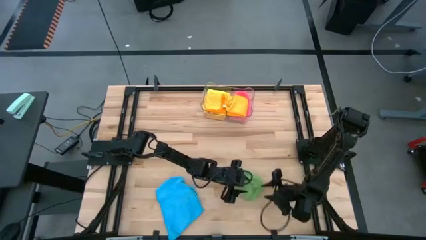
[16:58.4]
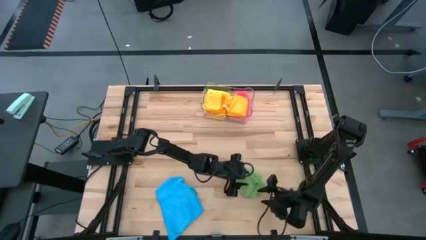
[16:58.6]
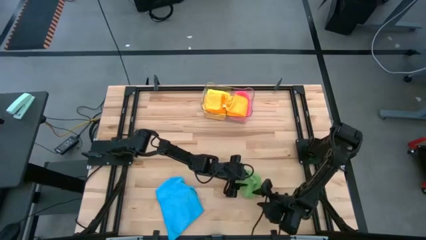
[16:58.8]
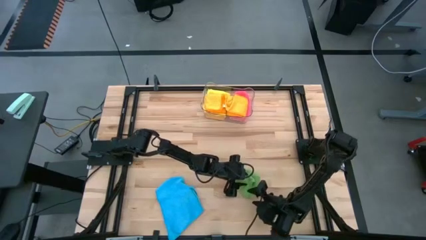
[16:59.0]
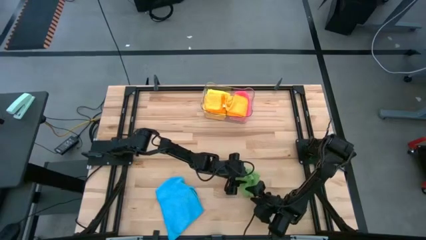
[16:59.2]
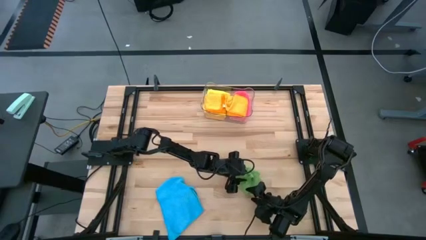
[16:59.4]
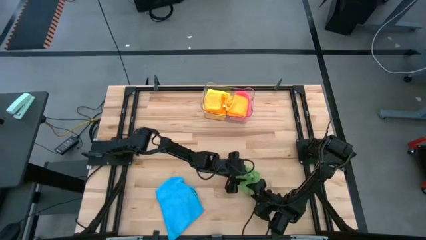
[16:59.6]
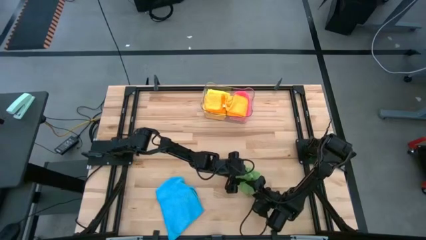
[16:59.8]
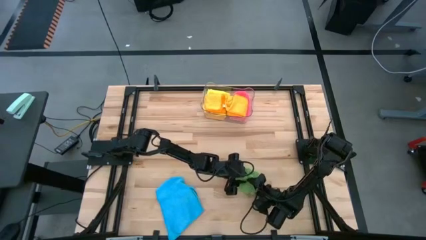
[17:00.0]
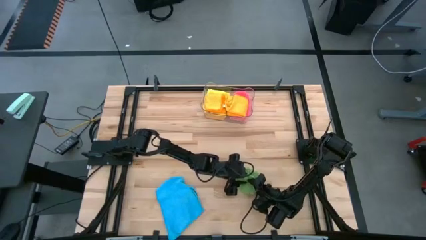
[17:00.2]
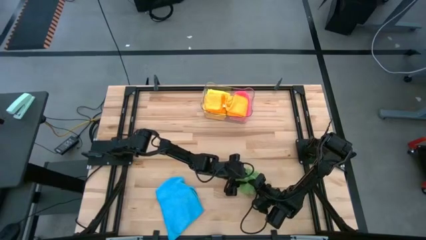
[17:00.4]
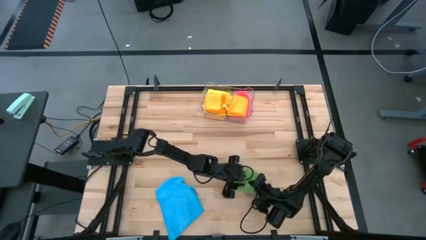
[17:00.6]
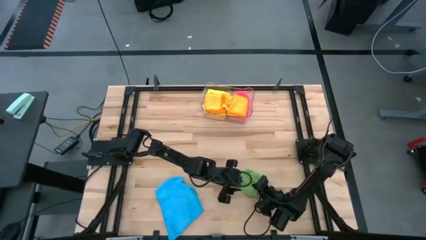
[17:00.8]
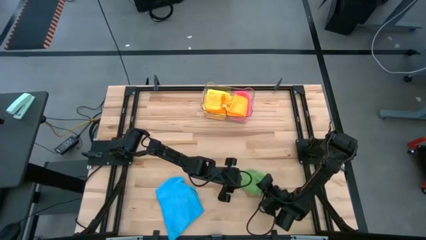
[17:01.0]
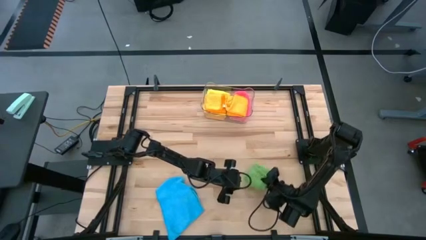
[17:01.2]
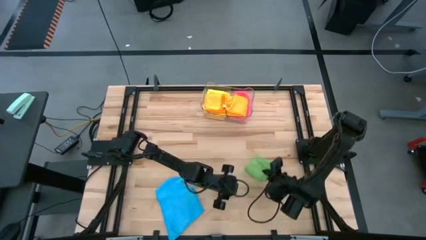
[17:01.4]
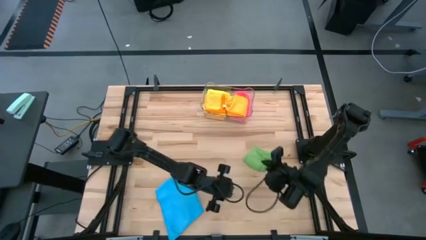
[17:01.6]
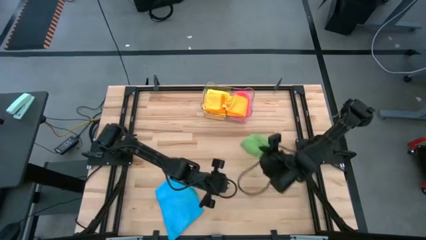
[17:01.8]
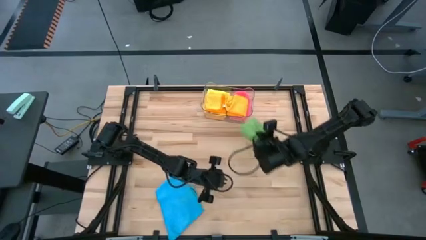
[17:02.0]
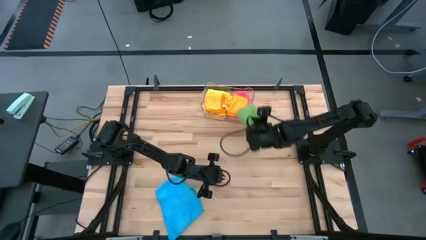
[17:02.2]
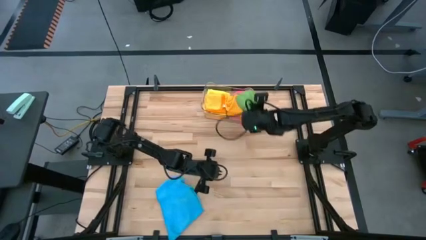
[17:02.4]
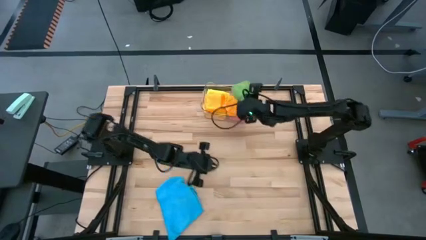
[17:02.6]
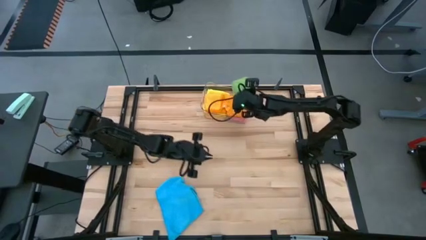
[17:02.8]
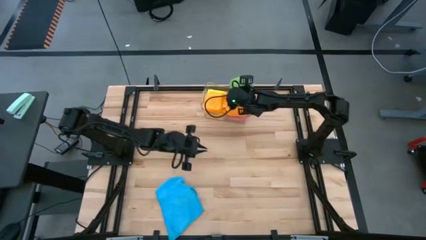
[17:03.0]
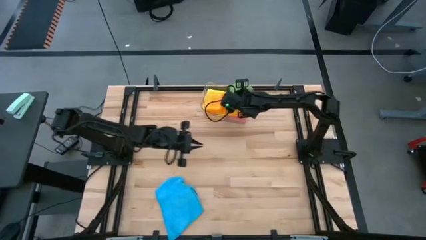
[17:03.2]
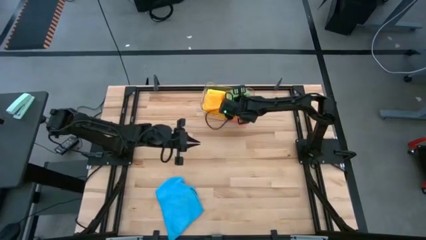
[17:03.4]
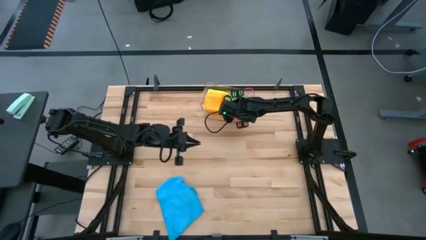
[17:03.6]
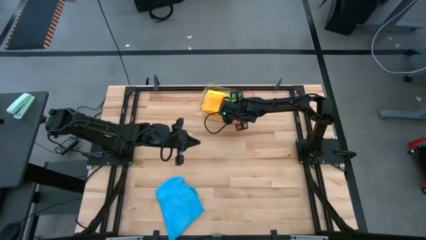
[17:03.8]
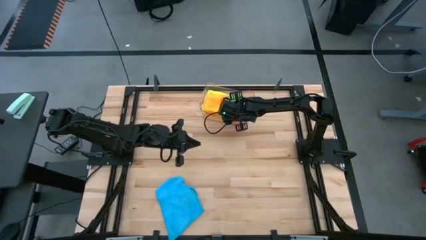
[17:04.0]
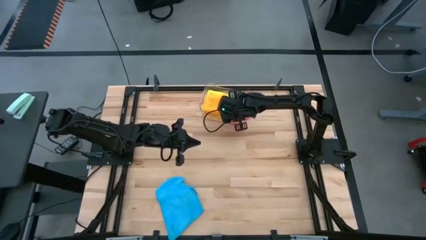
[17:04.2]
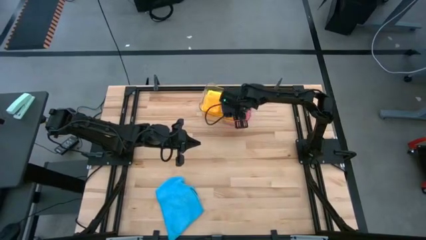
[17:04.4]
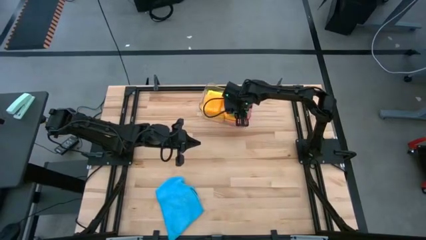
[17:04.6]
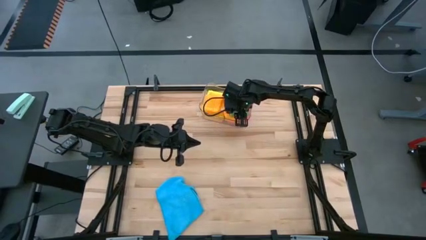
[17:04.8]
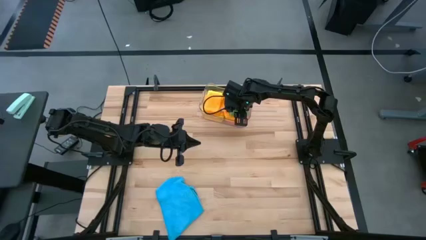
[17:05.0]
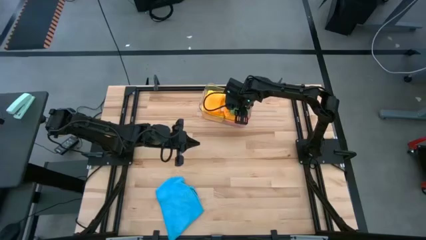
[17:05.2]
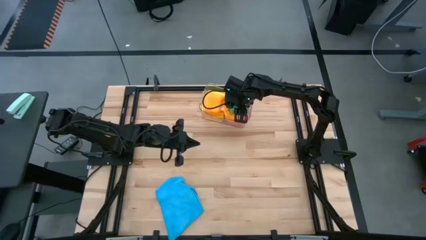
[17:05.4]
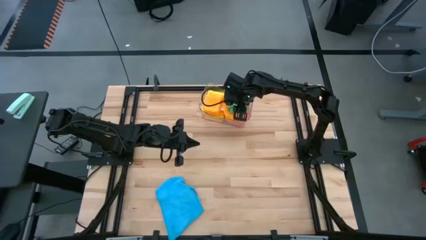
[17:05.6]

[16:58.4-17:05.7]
Task: Fold microfiber towels
Put the green microfiber cloth into the transparent bin

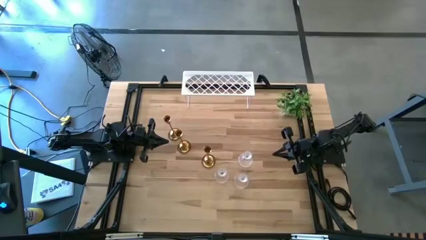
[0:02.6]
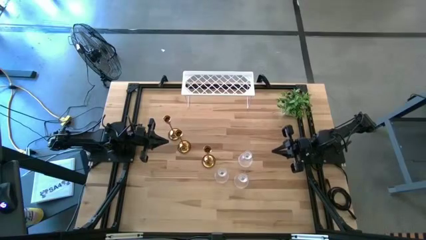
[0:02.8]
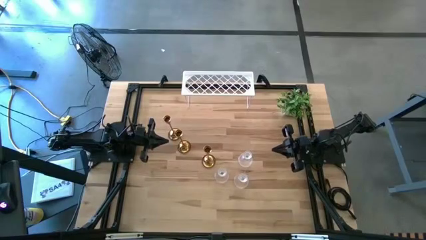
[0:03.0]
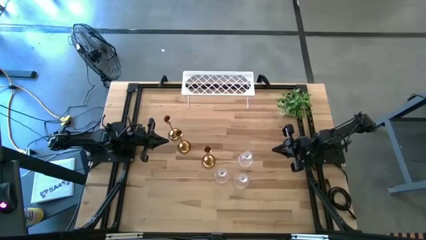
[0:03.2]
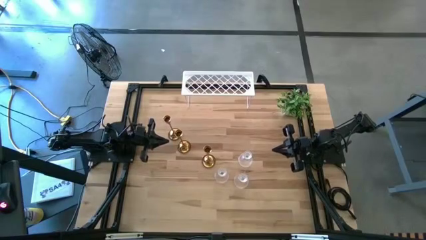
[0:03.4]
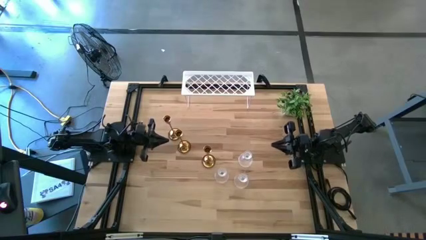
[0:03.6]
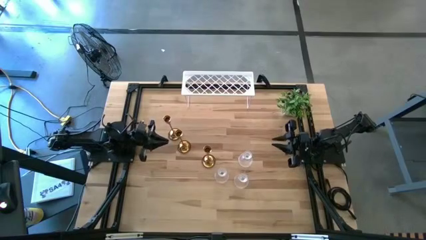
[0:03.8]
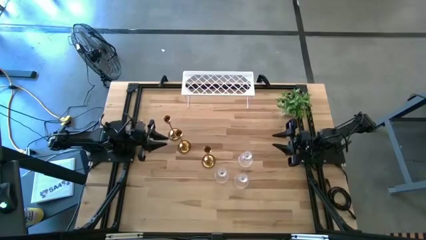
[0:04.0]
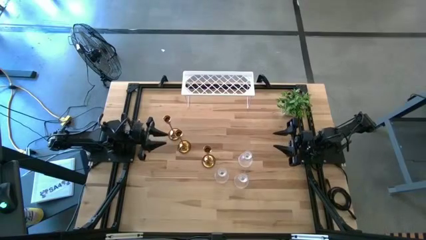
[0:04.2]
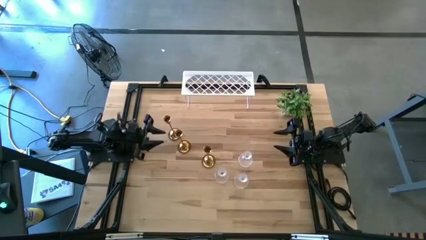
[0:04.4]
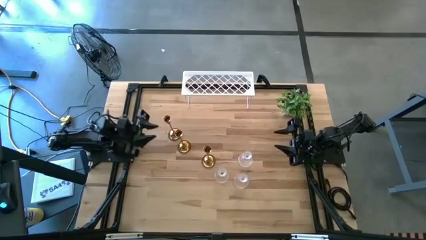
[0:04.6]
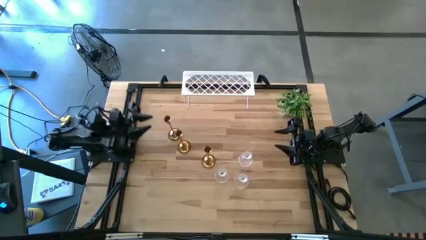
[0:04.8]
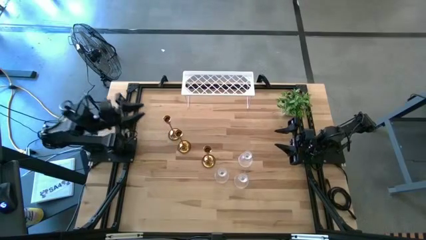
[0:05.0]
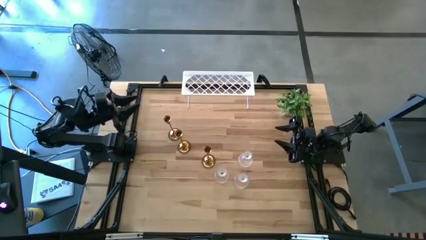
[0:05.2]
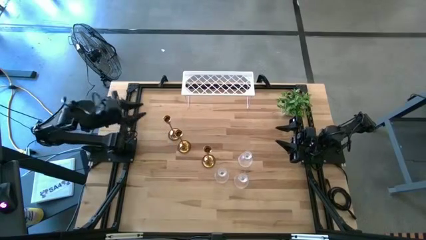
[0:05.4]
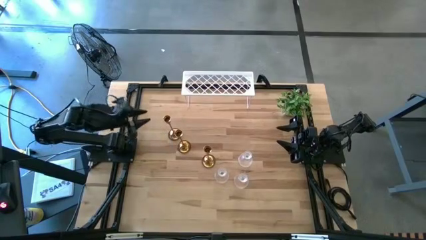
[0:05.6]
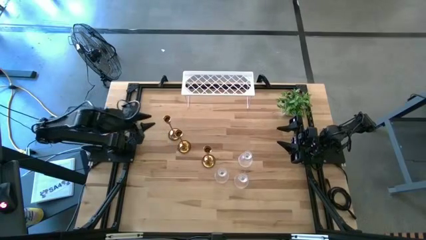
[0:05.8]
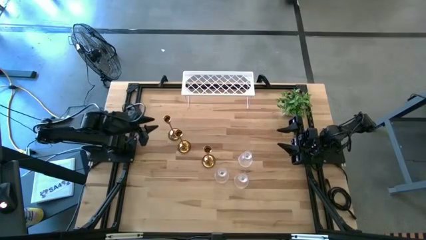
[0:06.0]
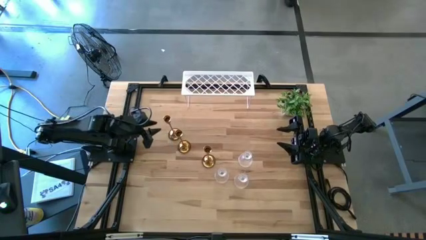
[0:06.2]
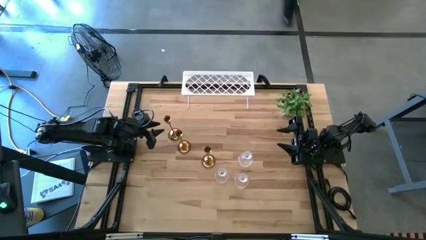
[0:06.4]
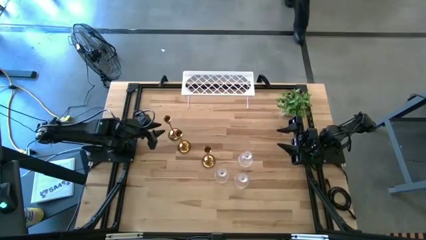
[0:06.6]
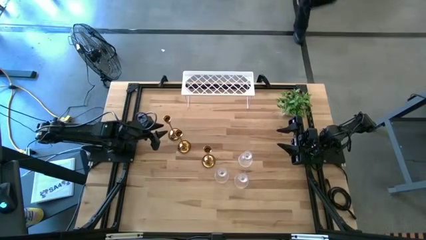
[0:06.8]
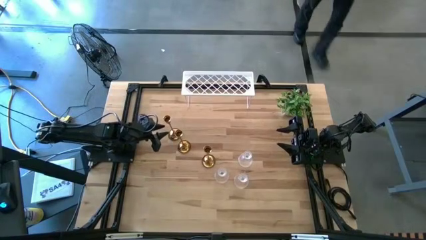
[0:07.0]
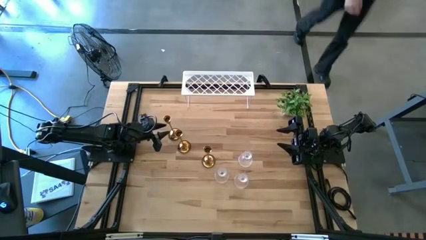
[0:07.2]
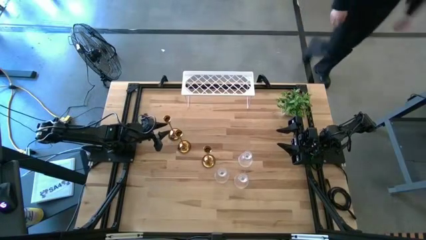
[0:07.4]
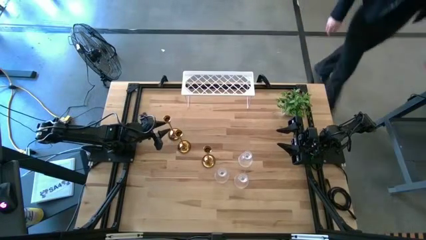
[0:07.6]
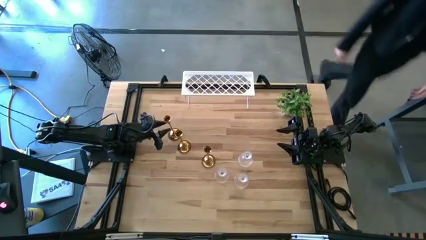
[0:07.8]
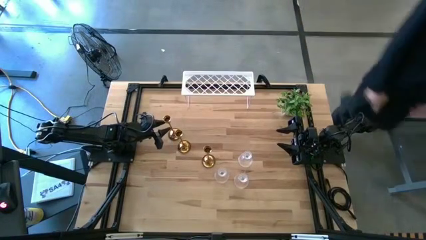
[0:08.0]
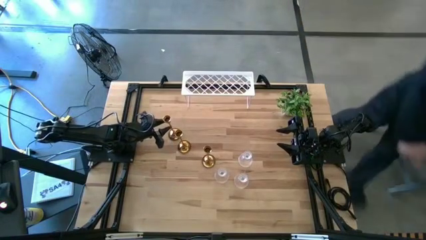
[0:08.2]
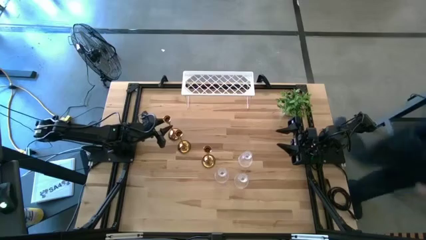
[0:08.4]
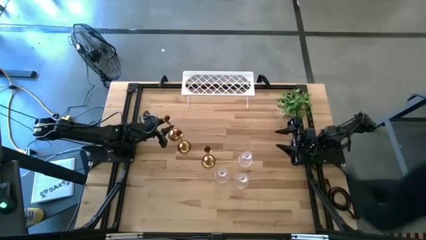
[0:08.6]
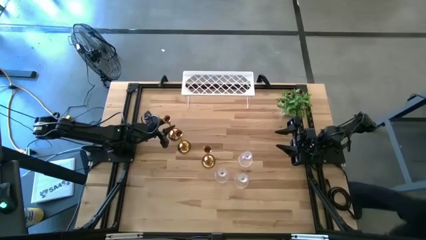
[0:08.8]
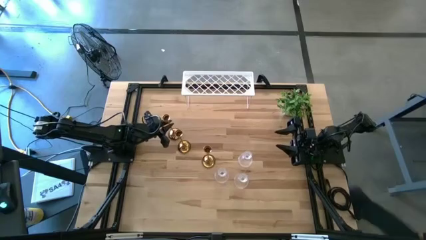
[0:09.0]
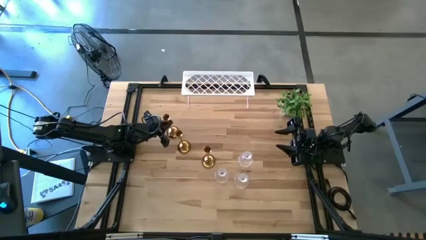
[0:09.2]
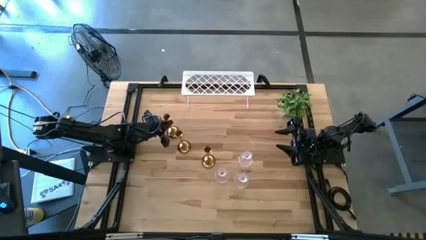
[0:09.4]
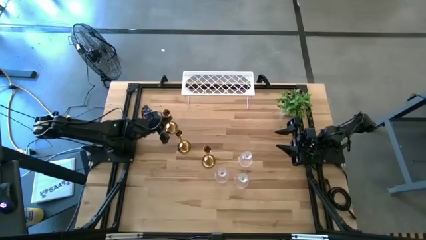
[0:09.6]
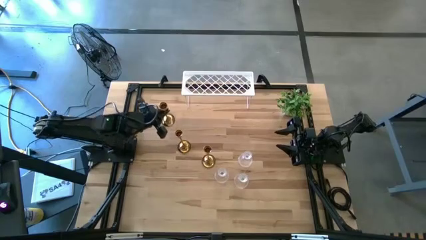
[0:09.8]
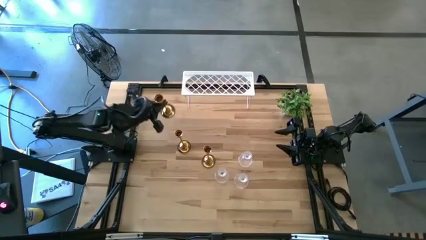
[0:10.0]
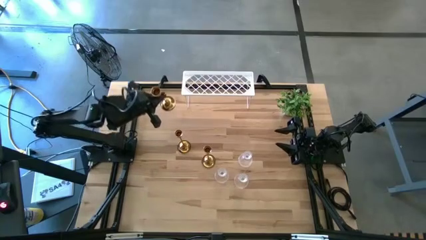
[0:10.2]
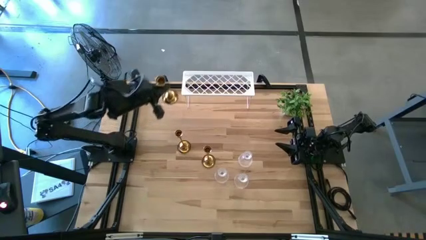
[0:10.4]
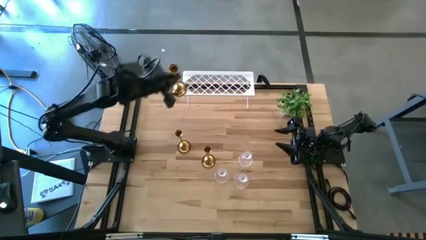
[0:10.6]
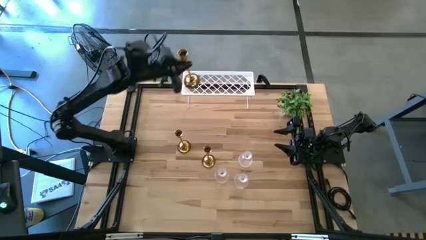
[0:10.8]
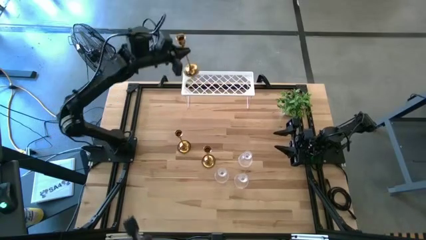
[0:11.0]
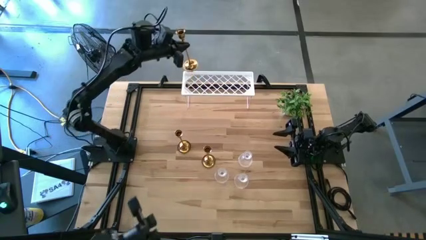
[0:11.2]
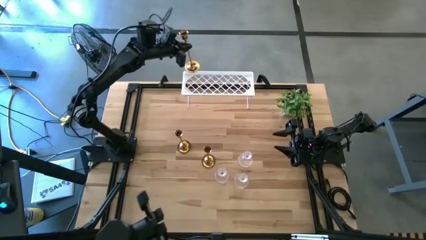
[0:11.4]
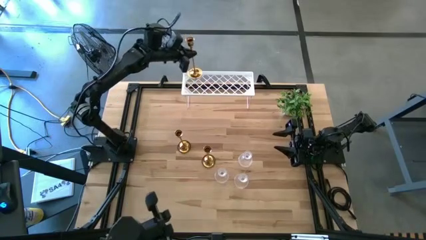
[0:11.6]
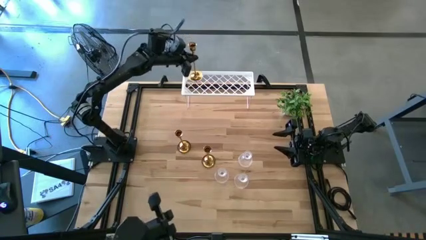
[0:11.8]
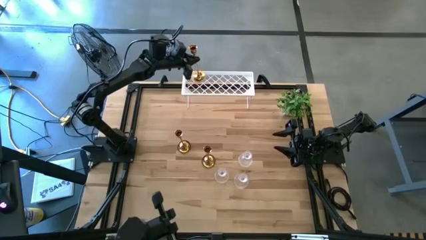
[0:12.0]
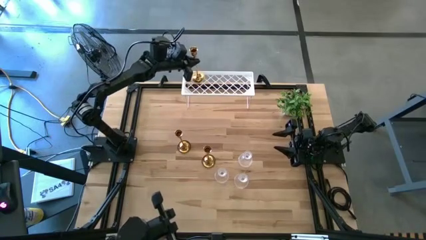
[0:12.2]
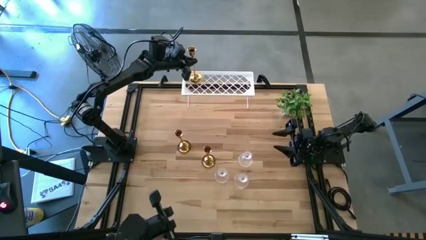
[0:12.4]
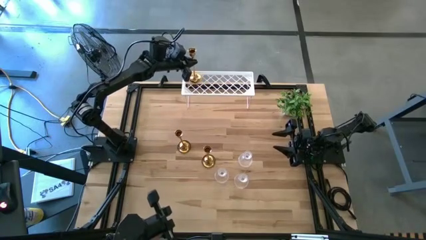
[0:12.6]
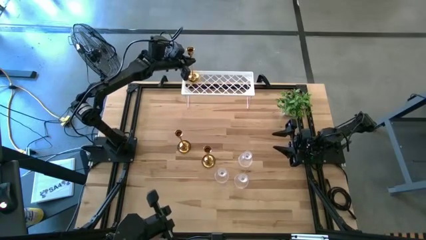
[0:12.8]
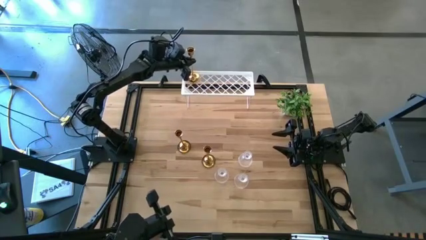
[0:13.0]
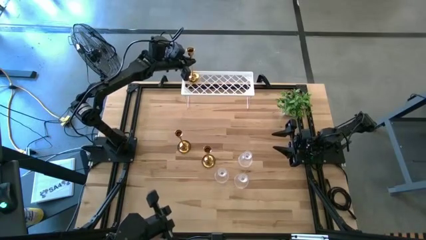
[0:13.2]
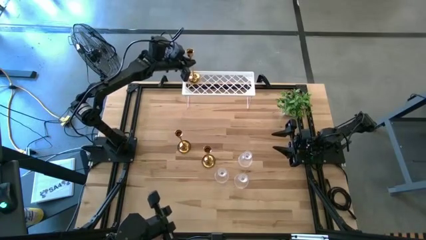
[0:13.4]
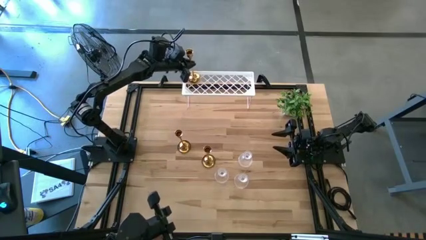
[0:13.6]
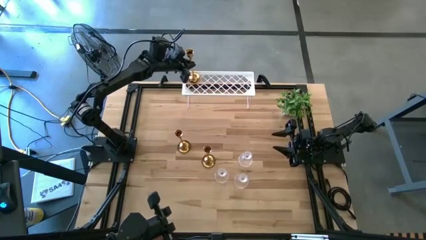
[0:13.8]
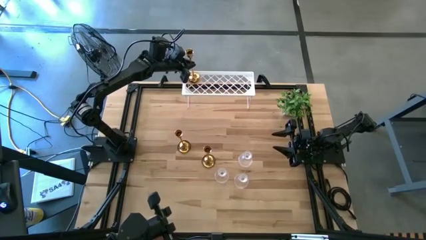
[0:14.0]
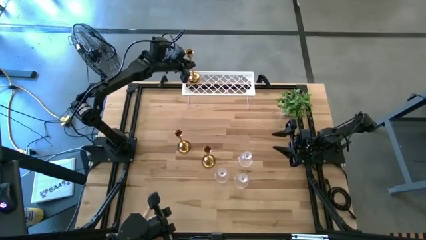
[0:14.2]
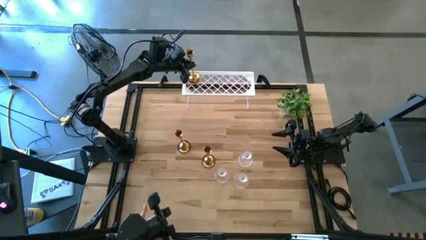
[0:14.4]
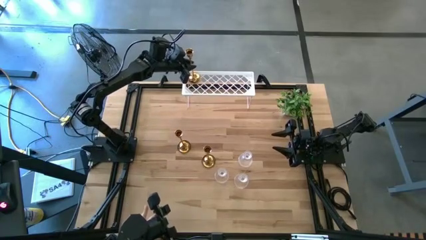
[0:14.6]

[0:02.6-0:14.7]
Task: Pick & Place candle stick holders
Put the top gold candle holder on the shelf
